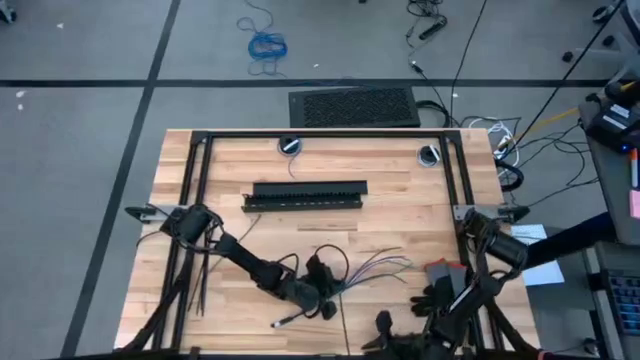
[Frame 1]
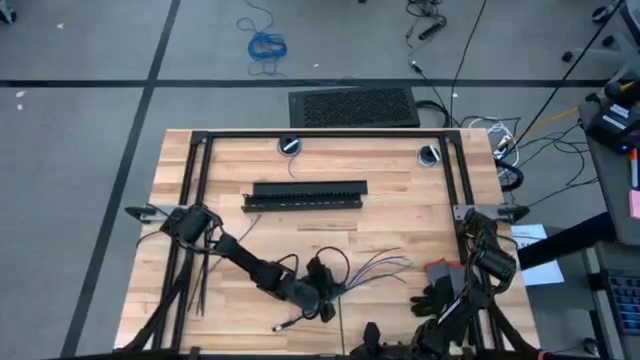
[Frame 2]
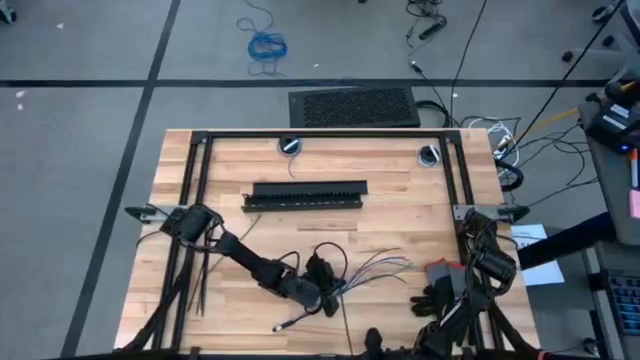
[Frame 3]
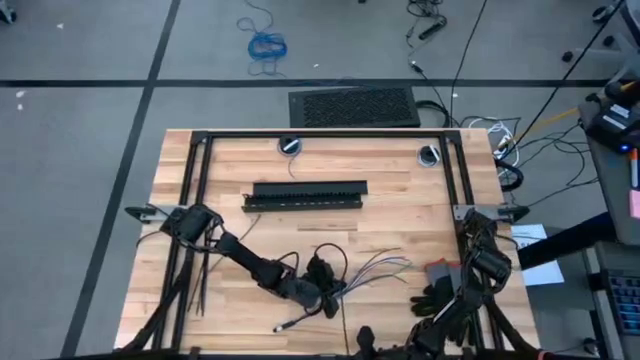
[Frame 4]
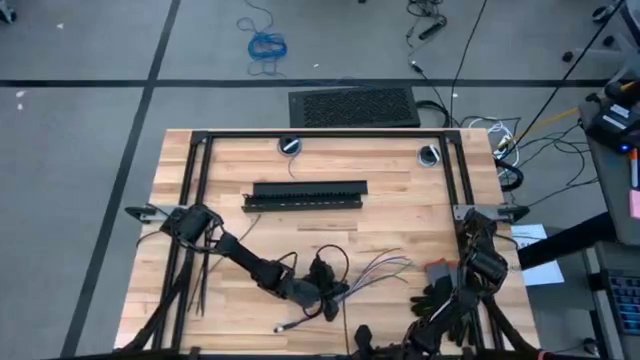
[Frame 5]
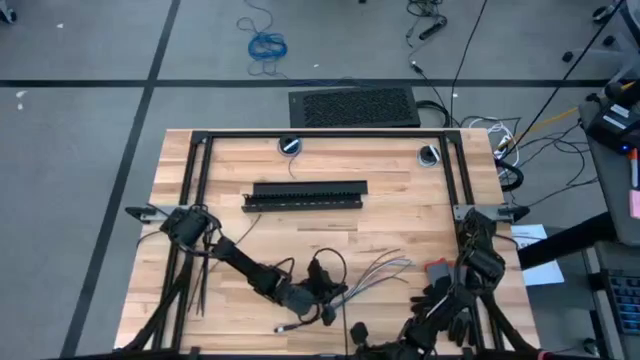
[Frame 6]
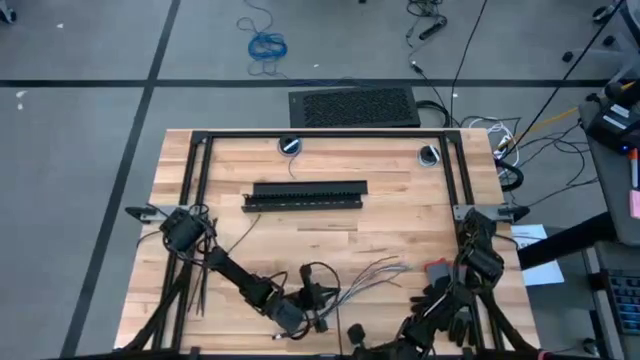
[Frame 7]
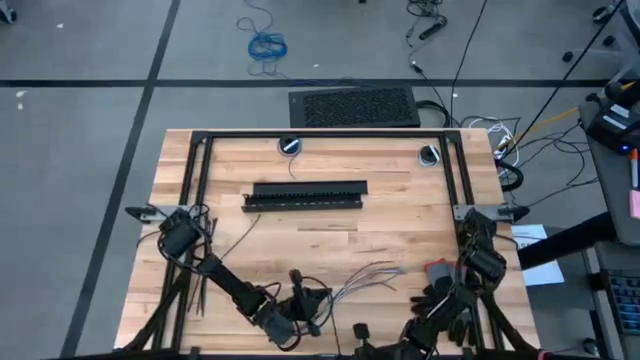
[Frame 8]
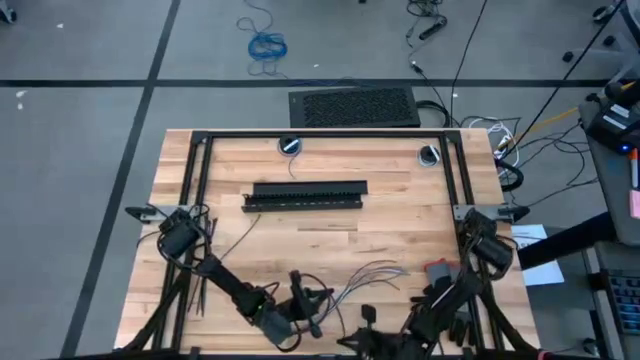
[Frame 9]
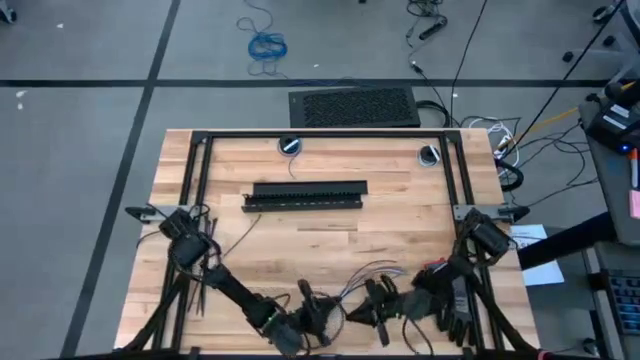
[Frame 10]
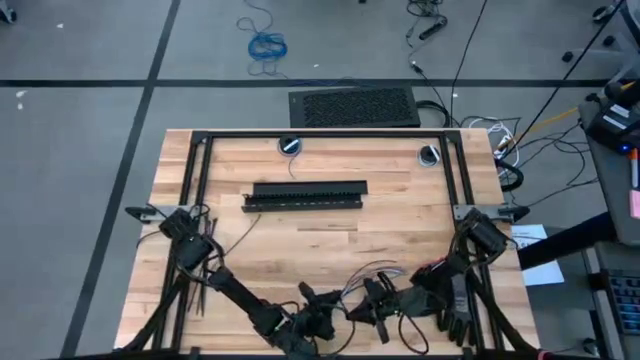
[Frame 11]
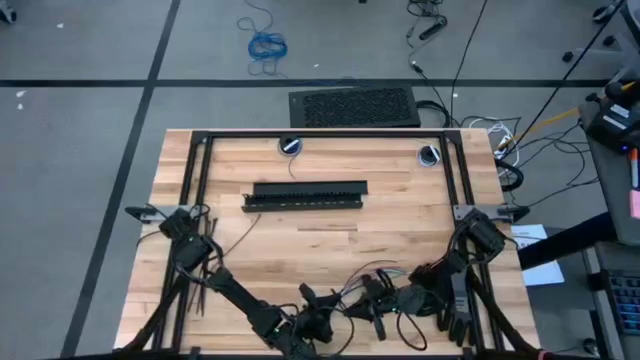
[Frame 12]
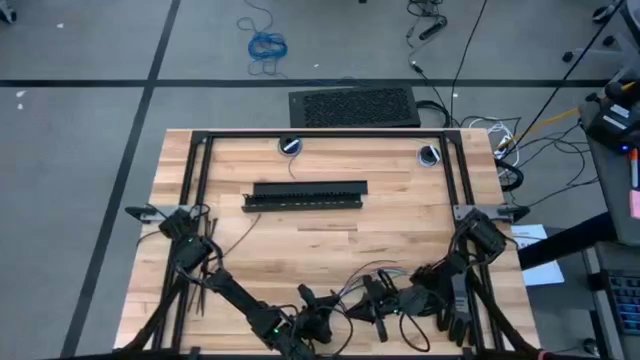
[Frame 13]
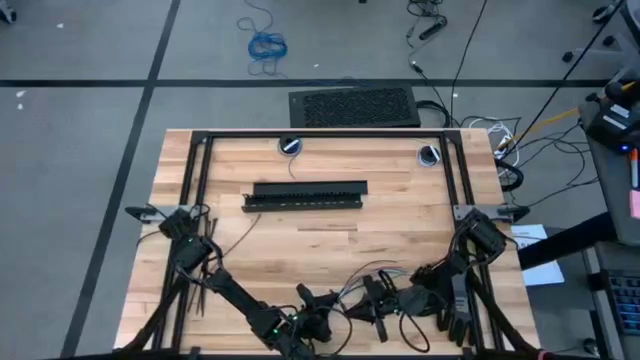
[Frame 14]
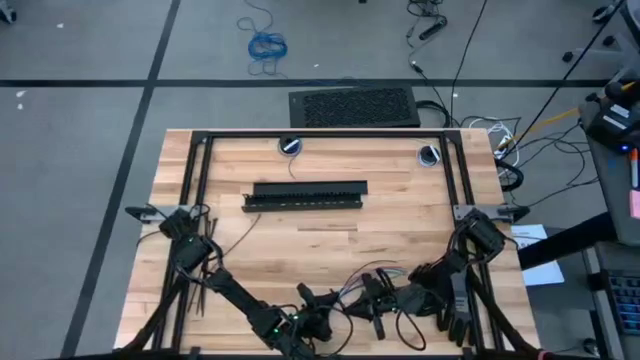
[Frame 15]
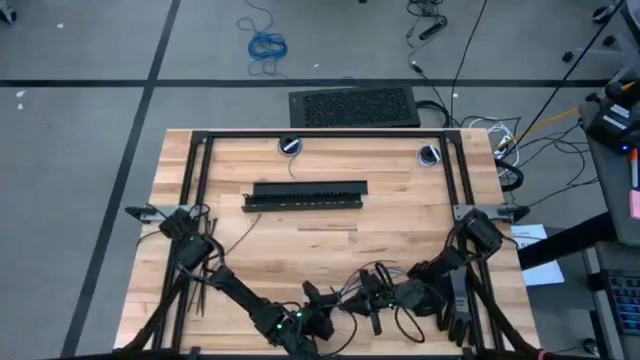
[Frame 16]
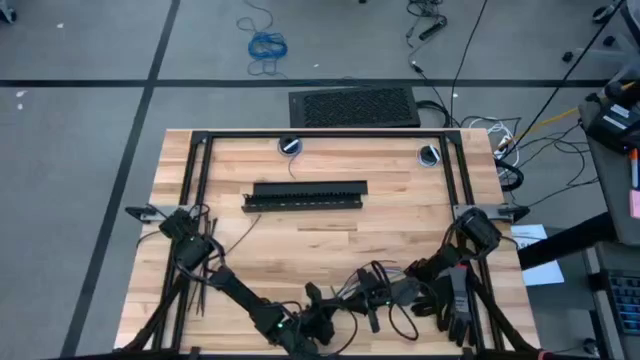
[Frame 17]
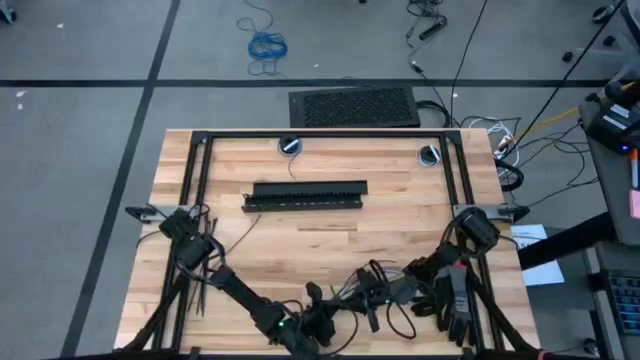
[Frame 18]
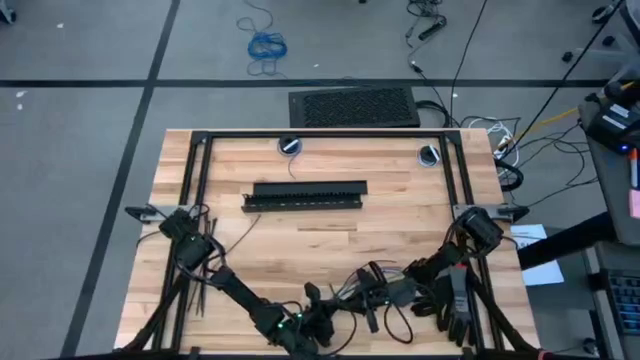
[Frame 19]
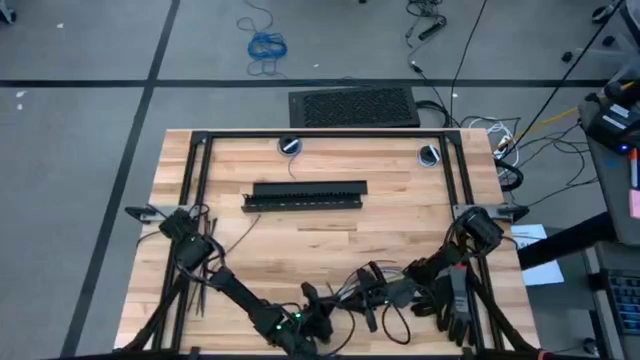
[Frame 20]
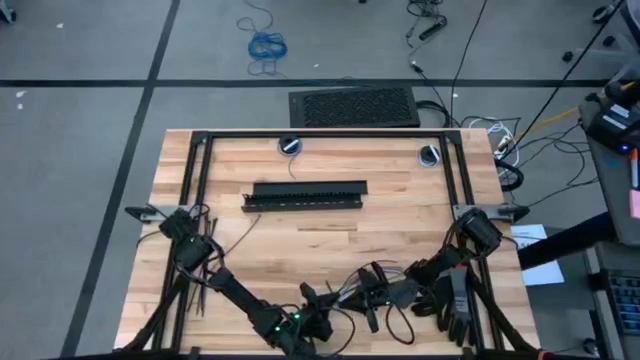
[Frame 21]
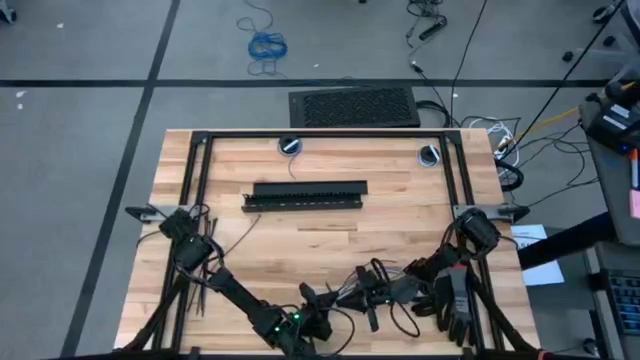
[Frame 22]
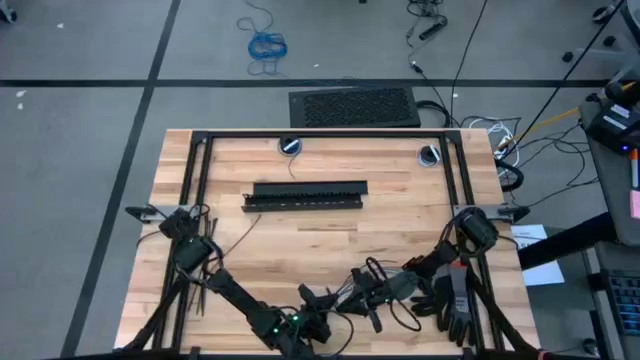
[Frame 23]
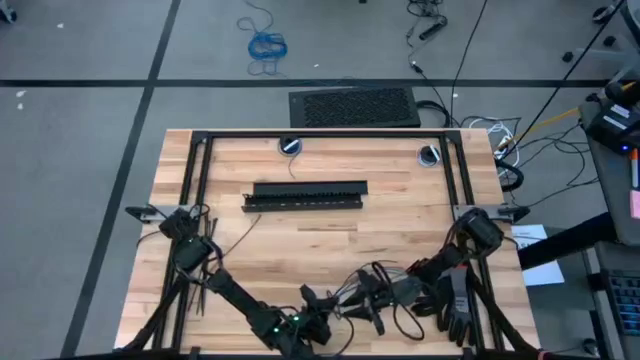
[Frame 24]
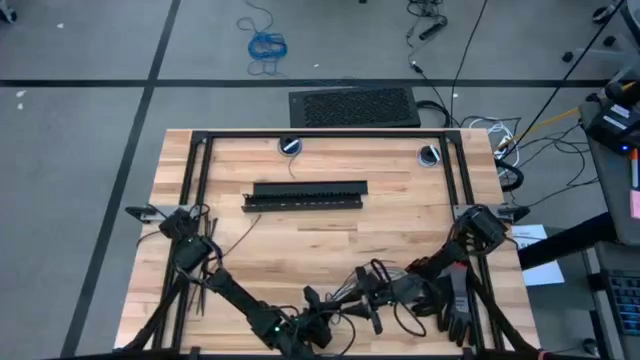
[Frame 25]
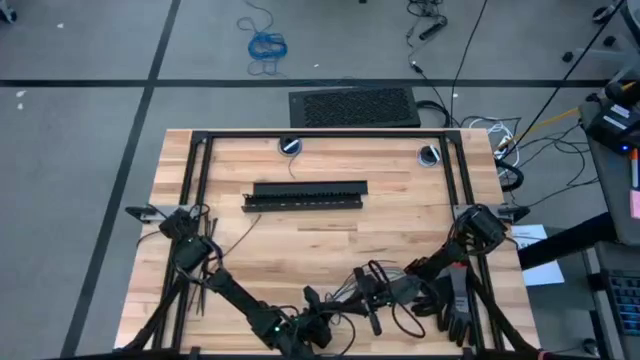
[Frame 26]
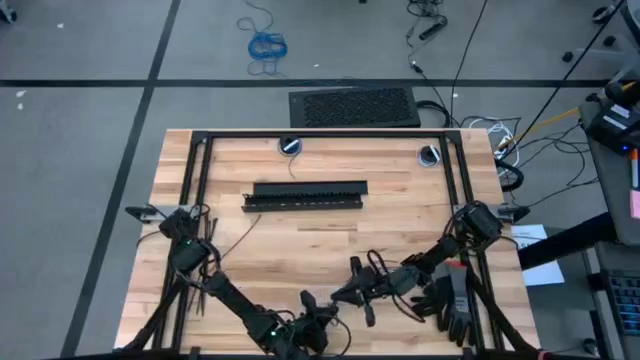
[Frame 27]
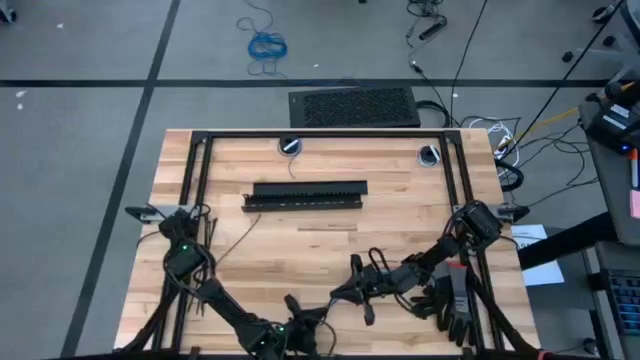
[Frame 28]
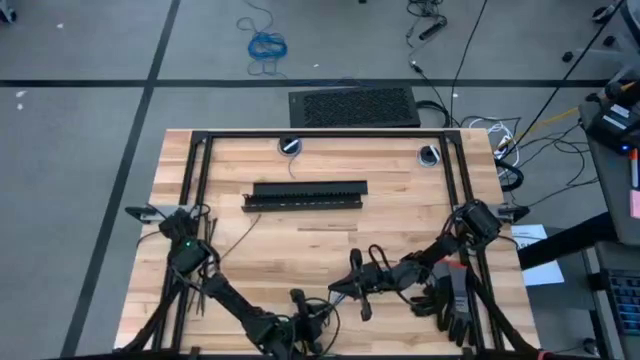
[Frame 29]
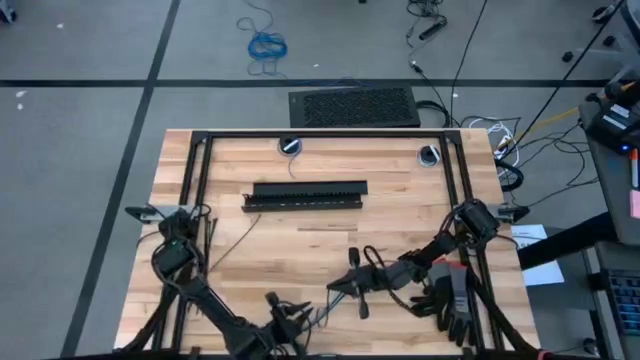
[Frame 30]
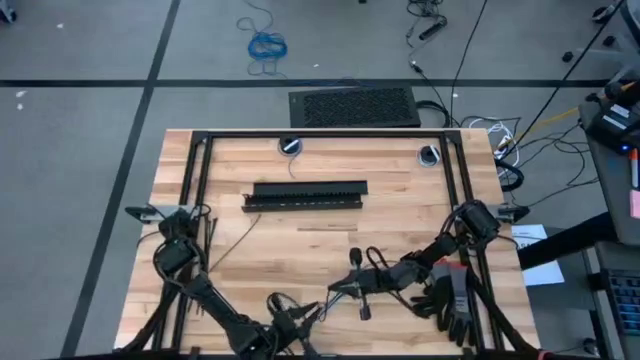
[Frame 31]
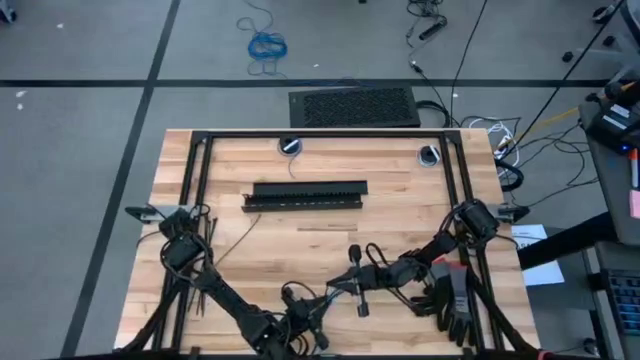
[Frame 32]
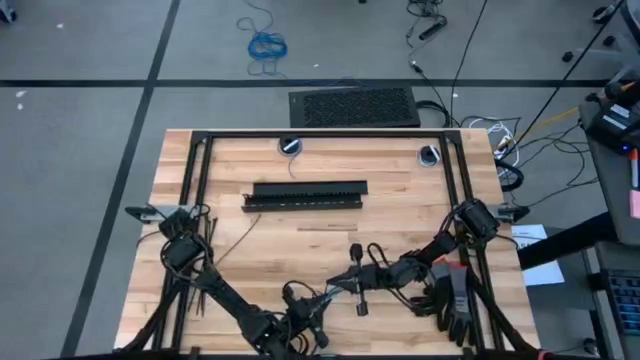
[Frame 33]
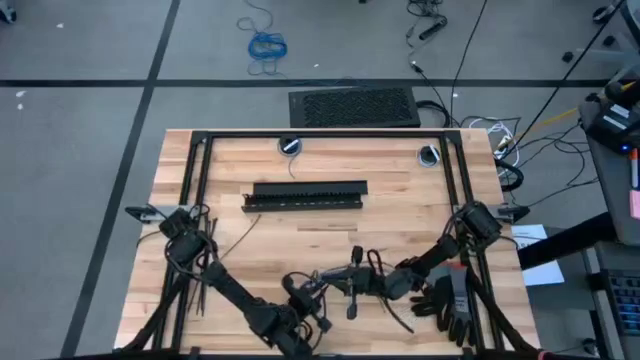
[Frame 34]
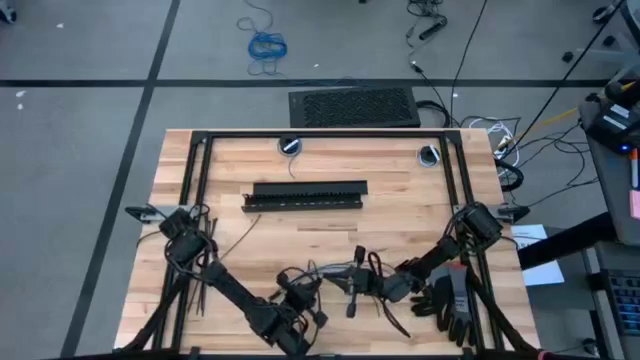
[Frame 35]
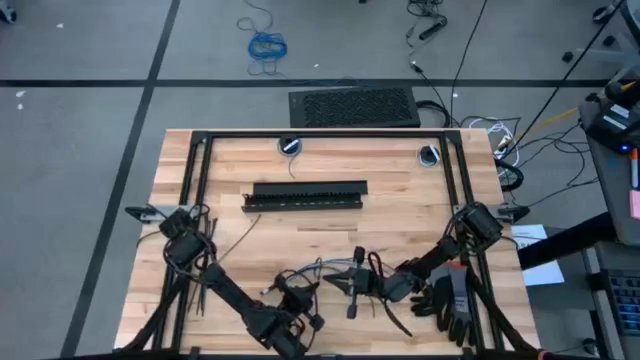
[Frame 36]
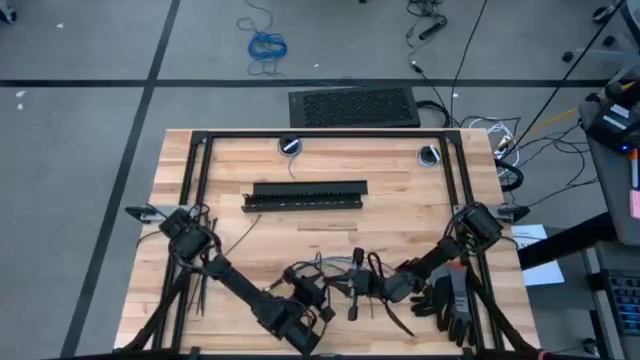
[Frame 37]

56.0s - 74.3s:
Task: Ziptie cables
Wrap the cable wires with zip tie
